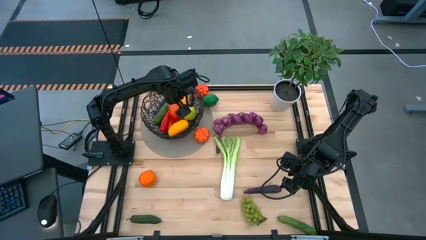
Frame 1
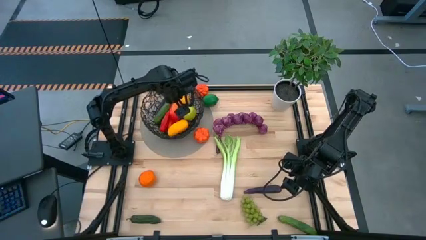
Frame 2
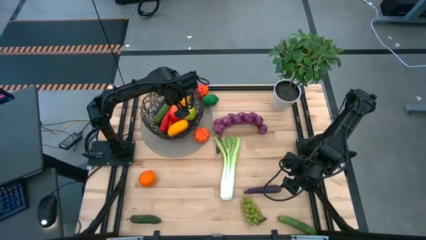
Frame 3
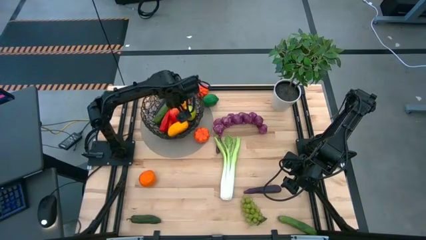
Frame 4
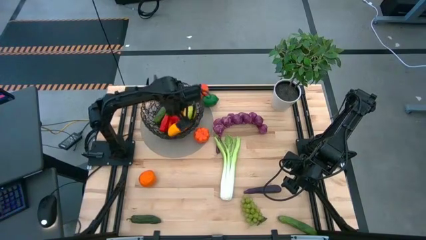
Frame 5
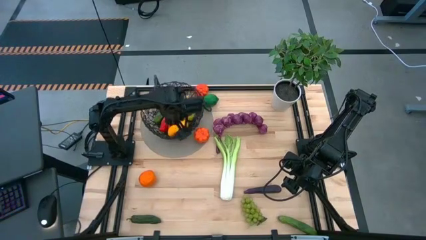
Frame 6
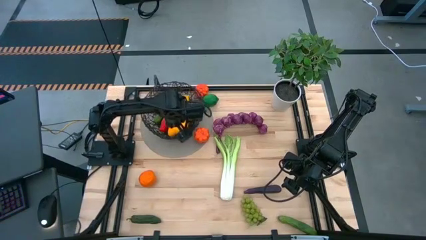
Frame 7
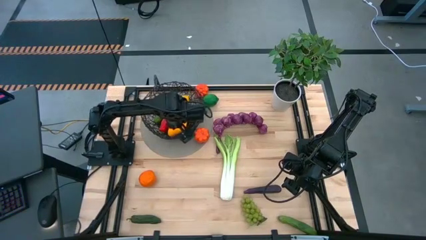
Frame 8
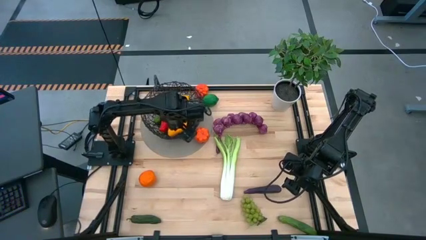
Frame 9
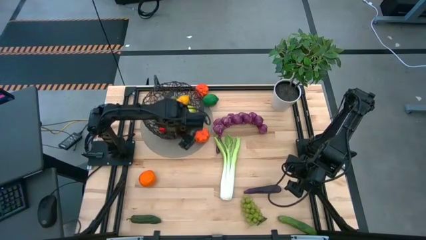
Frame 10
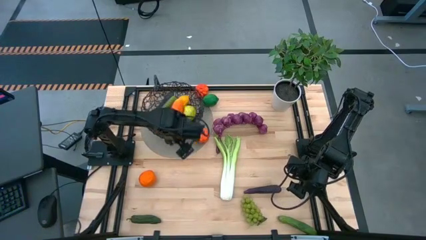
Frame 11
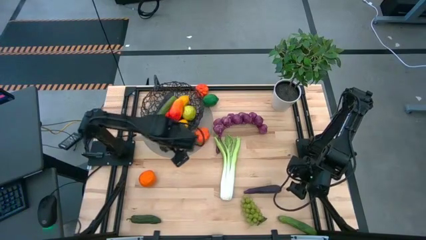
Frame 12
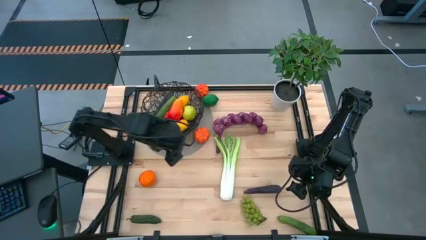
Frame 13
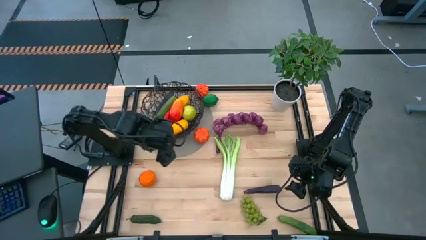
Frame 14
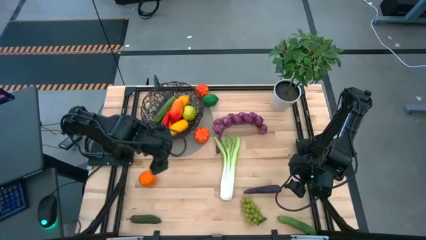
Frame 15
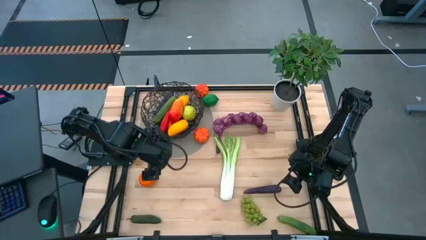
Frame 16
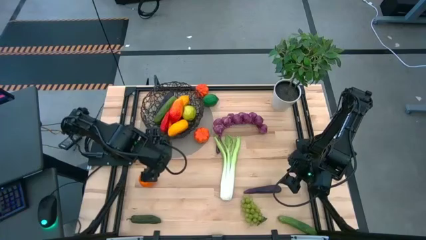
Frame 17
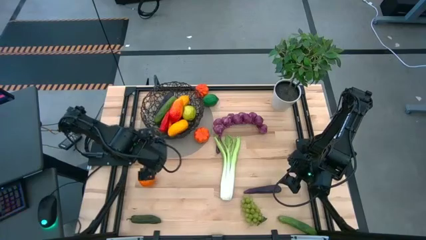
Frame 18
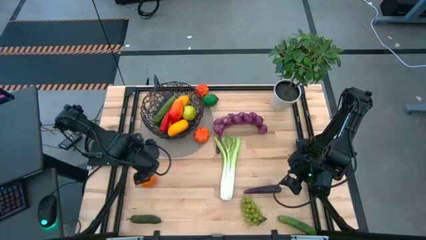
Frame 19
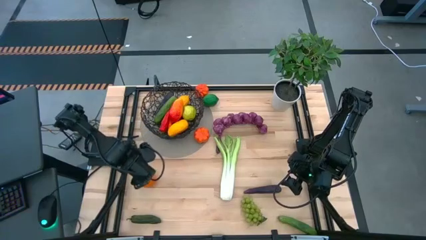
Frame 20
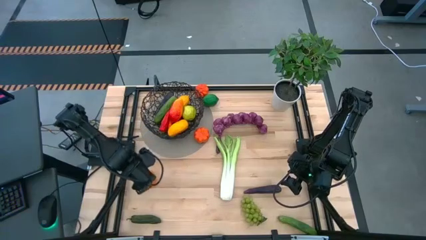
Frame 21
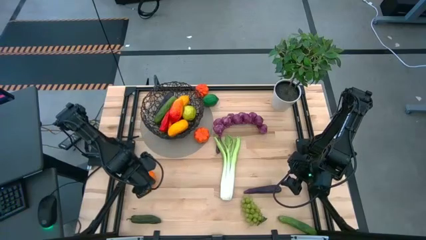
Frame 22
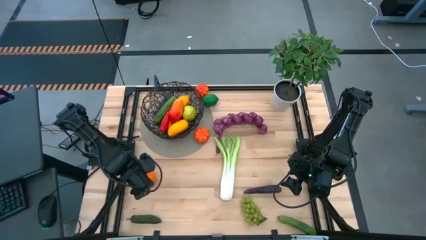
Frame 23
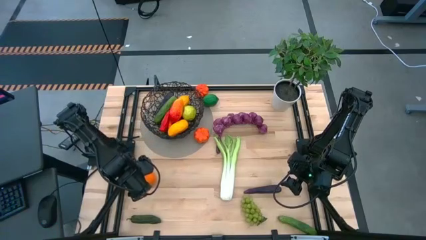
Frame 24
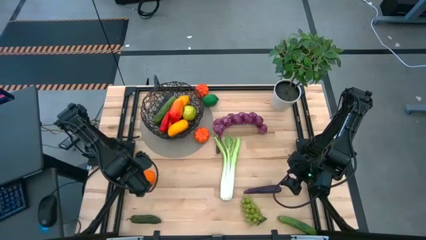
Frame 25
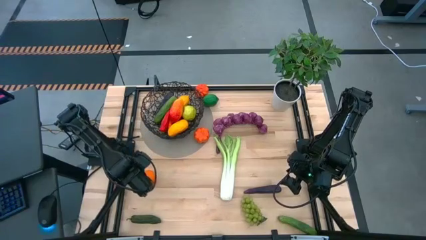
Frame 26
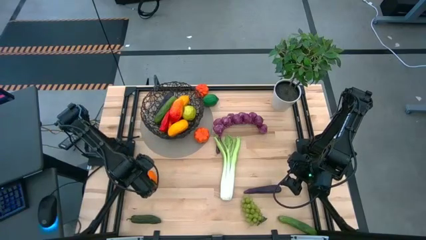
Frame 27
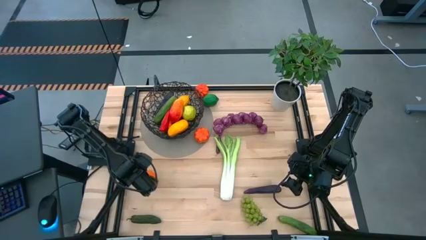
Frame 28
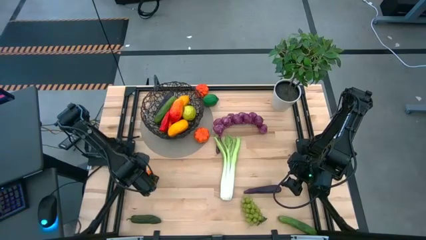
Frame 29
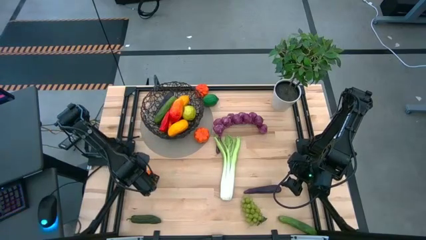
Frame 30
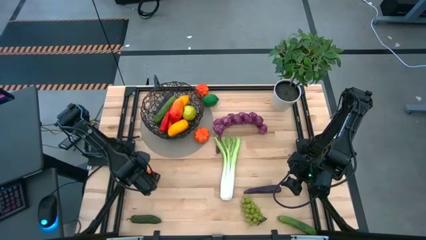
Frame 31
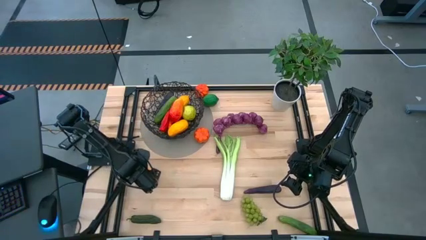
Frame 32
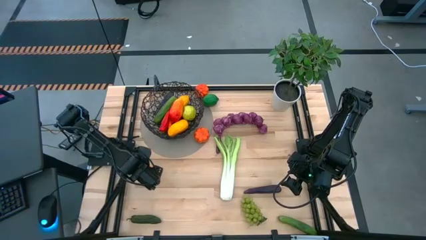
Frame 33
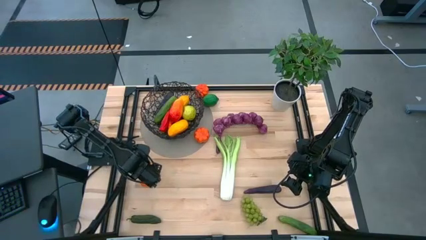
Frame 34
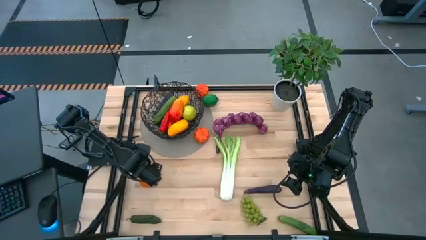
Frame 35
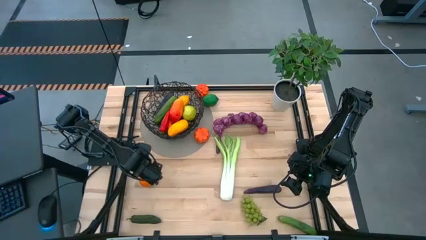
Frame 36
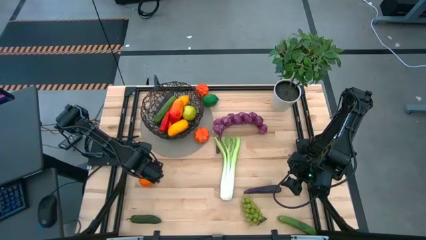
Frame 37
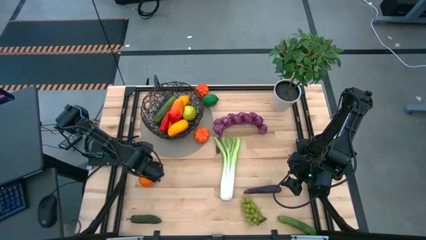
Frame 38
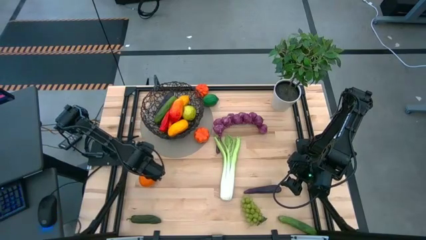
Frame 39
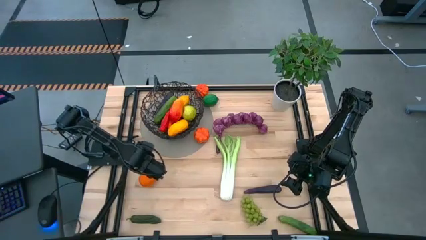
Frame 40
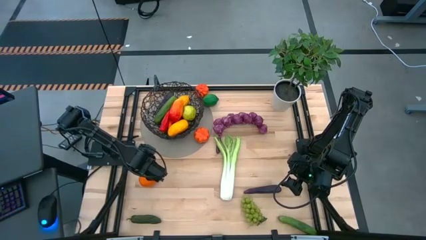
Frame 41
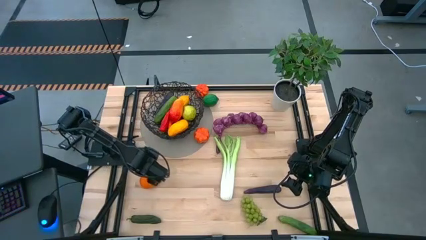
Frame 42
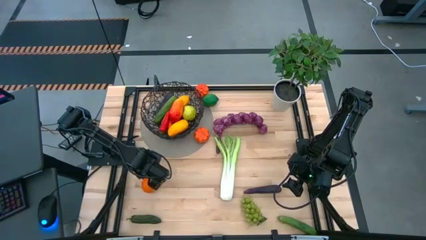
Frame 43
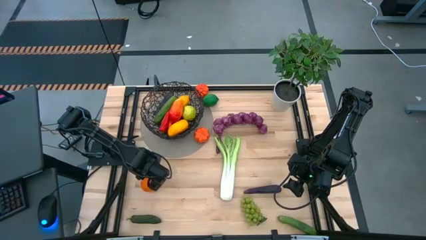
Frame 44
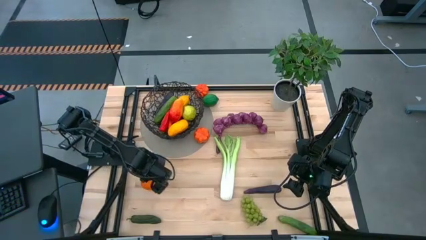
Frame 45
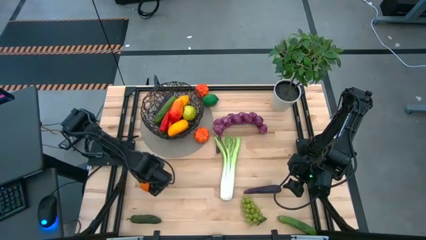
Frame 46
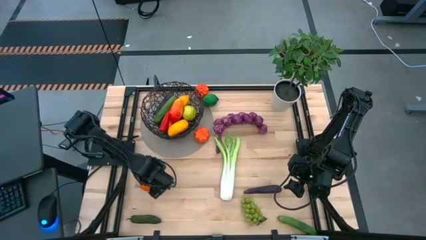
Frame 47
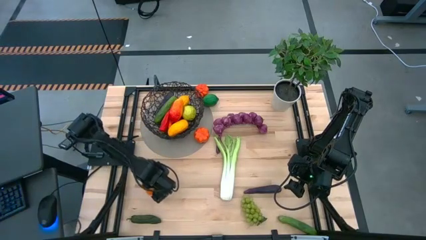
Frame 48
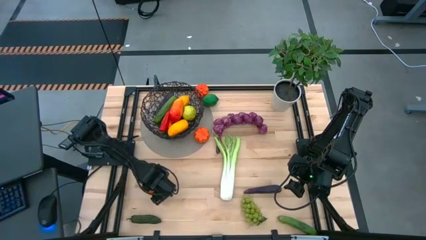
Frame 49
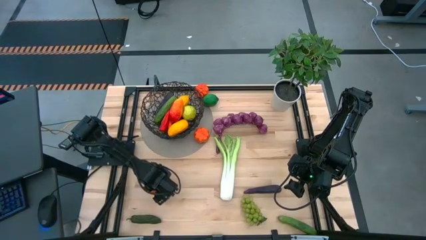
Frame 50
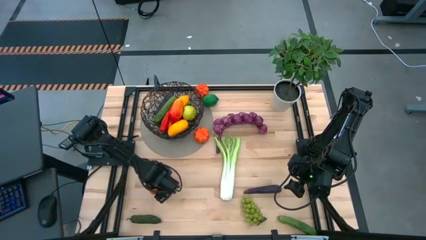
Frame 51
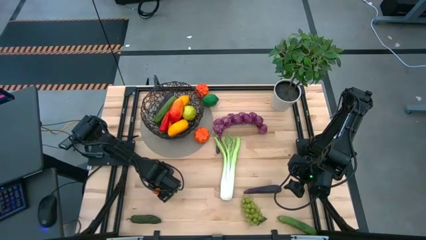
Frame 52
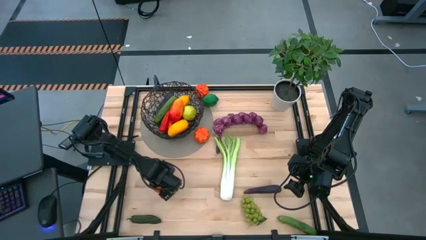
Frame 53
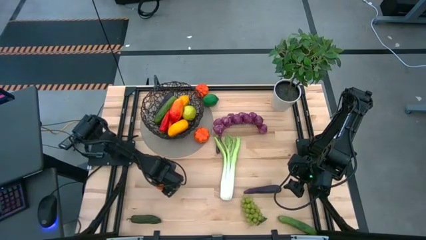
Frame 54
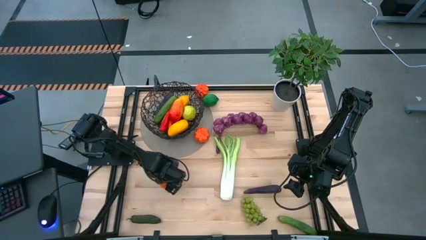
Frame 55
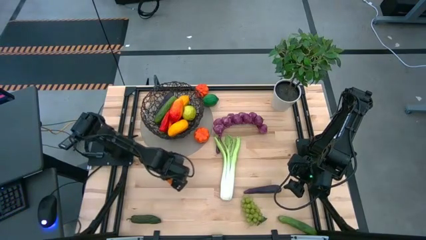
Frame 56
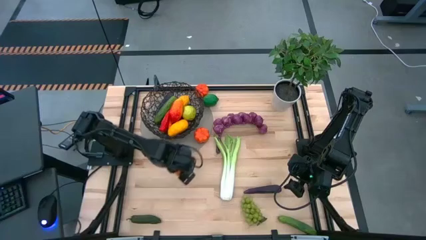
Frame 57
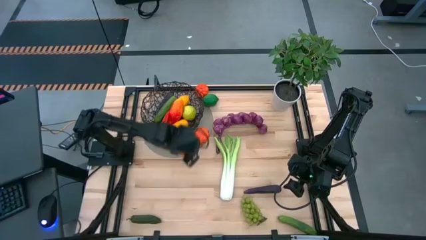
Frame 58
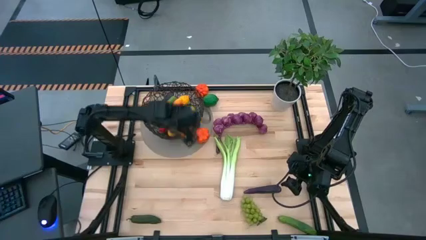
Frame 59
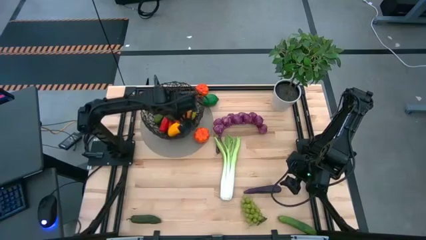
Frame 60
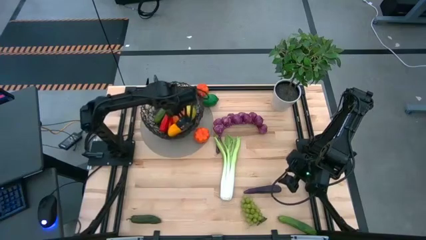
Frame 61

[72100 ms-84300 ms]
Task: Build produce basket
Put the orange into the wire basket

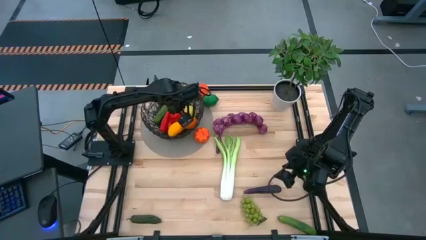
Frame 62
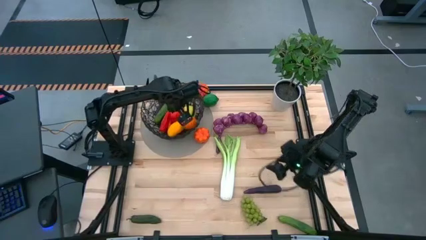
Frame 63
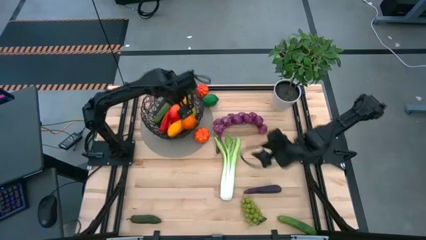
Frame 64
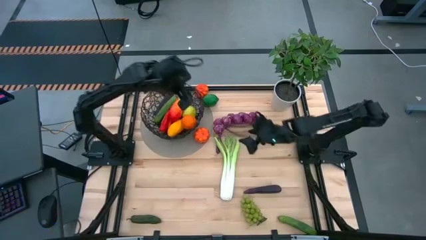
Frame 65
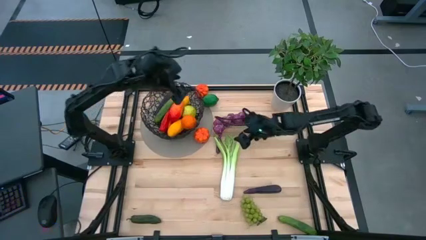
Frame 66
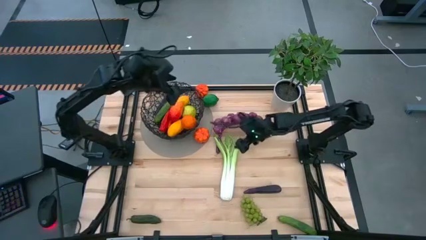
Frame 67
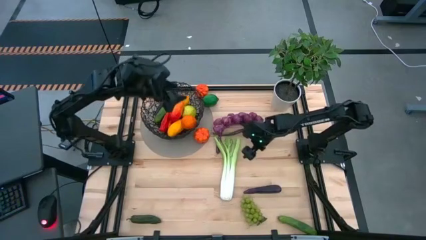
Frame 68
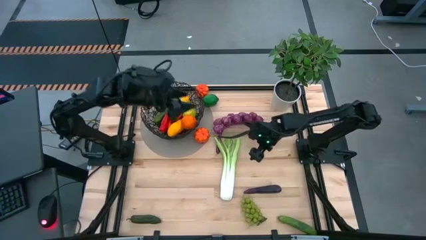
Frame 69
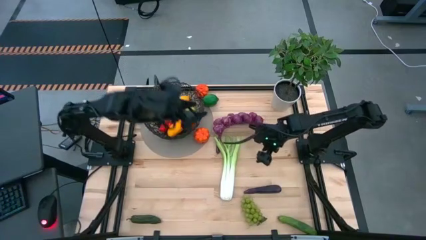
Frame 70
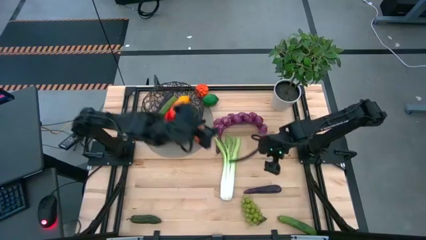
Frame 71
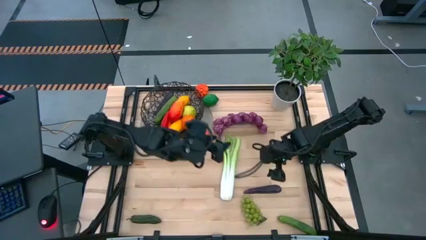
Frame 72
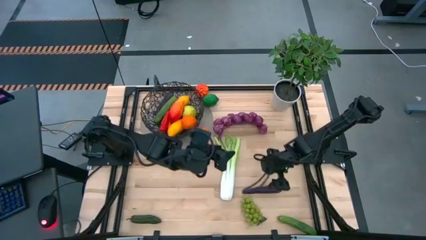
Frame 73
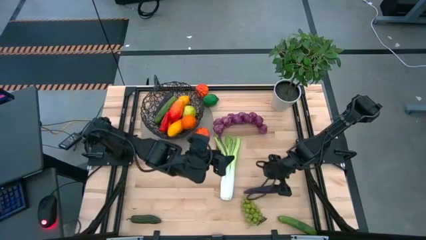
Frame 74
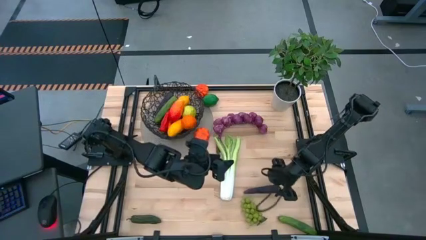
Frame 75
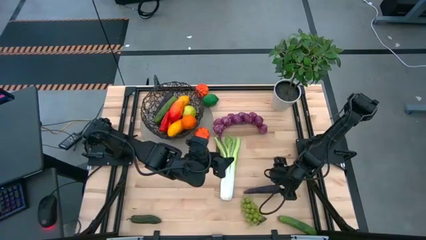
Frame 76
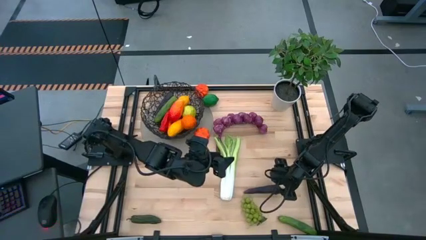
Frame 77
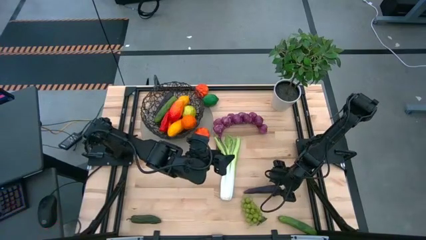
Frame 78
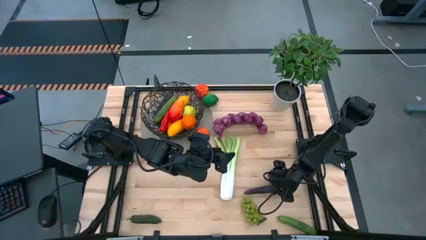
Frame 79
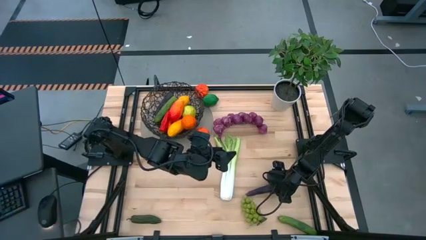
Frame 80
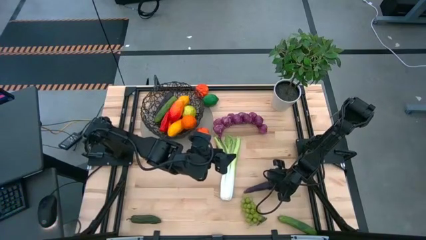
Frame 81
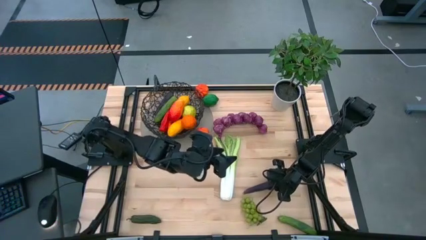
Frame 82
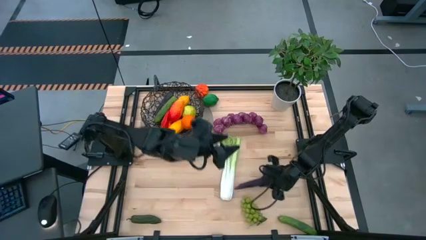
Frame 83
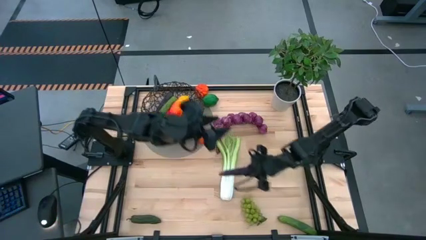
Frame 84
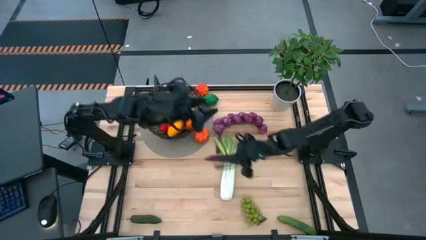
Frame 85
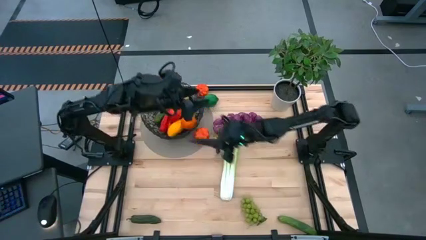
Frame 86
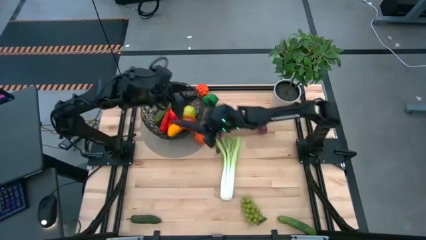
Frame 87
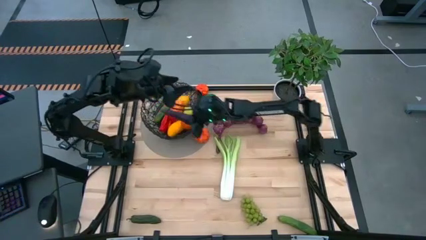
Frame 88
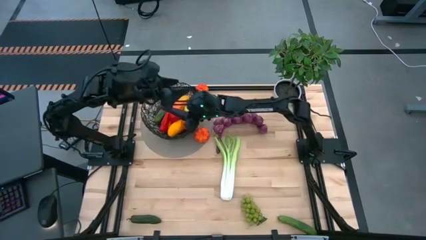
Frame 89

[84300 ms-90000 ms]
Put the violet eggplant into the wire basket
